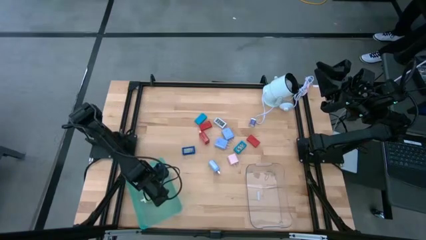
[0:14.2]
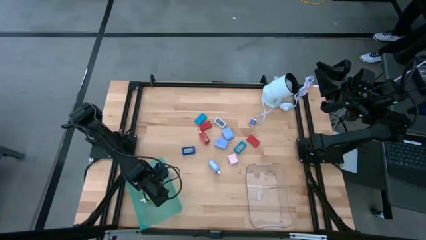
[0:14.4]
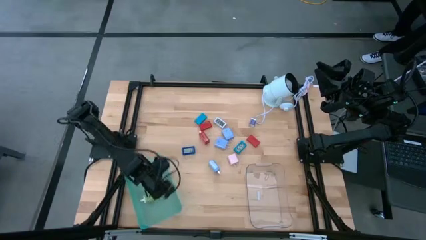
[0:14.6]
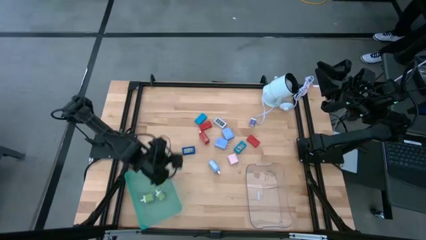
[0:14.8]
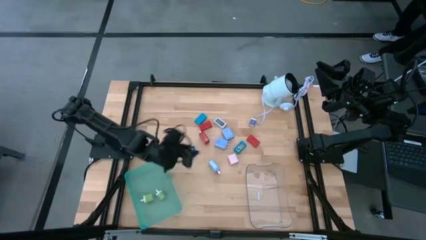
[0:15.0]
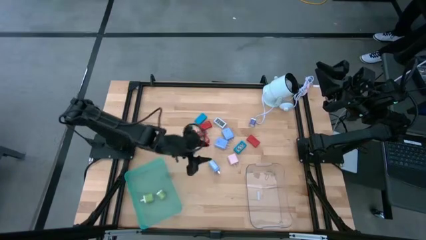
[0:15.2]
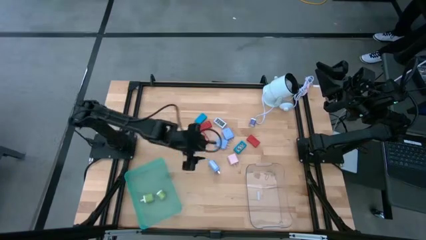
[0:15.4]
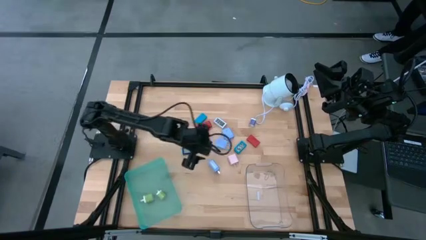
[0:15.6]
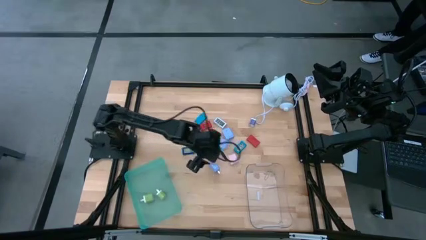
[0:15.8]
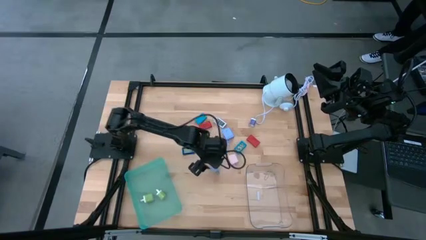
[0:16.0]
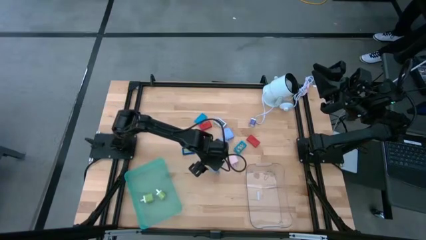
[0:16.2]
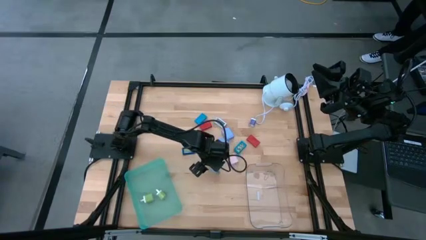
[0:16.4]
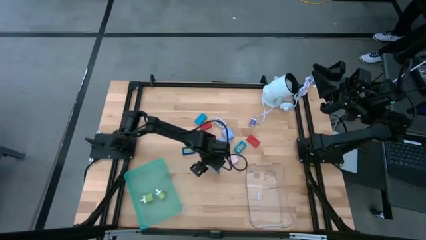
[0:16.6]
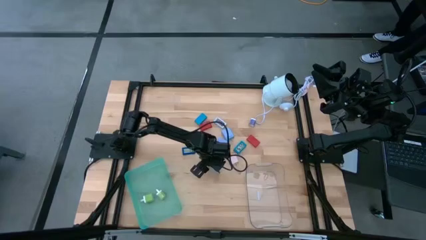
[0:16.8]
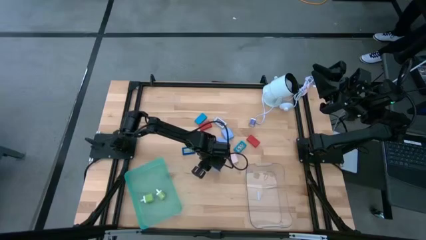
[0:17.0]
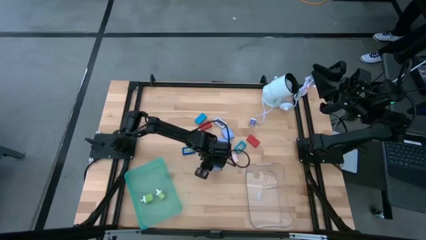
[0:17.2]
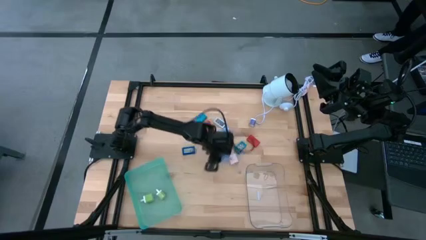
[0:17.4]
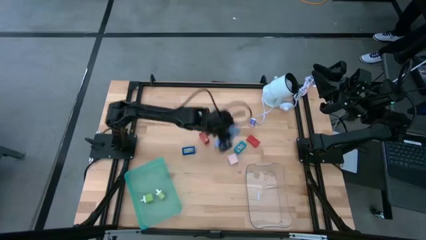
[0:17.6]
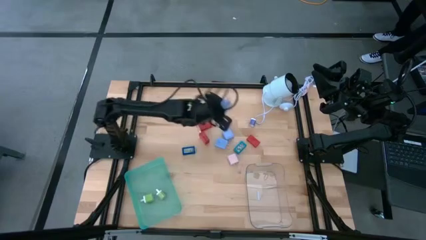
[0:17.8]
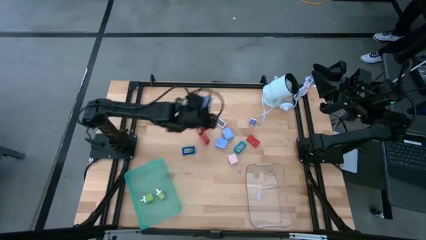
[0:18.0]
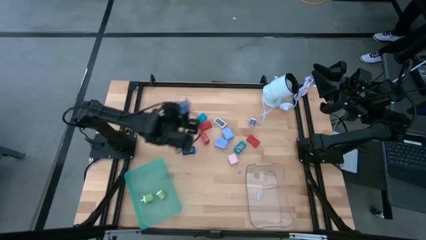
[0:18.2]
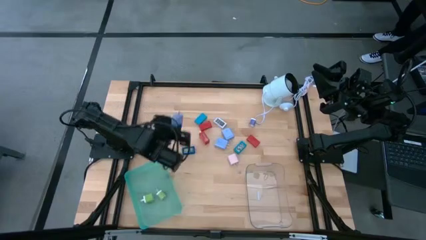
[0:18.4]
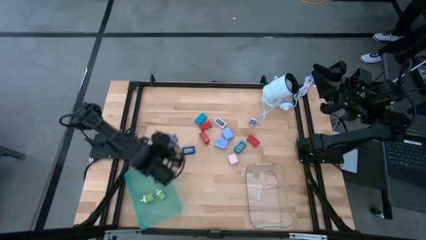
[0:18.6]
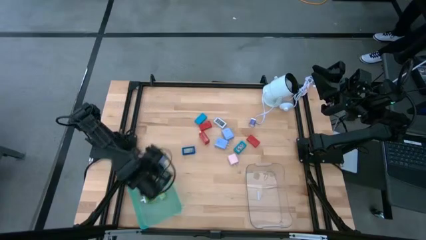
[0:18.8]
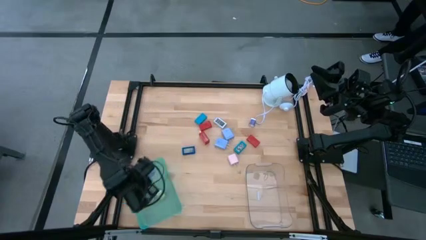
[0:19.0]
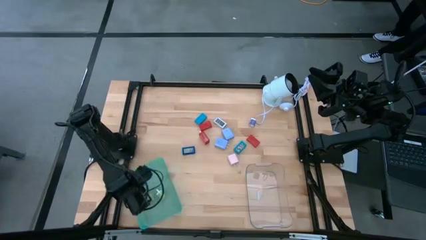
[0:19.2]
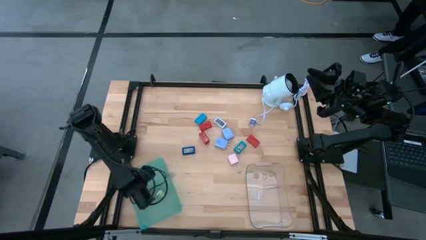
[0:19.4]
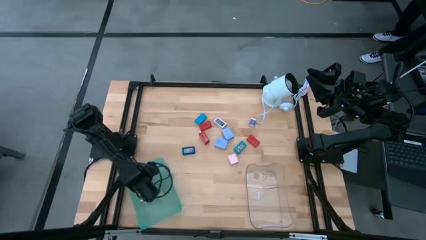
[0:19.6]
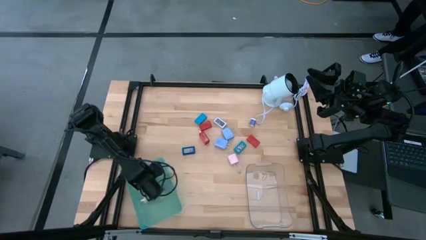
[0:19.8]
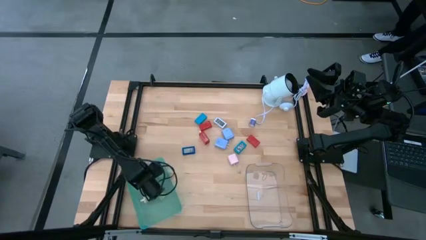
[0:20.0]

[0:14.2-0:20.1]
Task: Pick & Place Office items
Put the bottom blue charger adapter into the blue bin

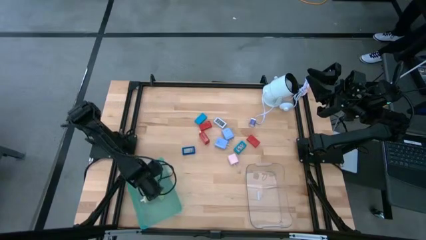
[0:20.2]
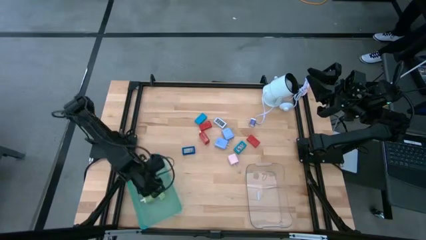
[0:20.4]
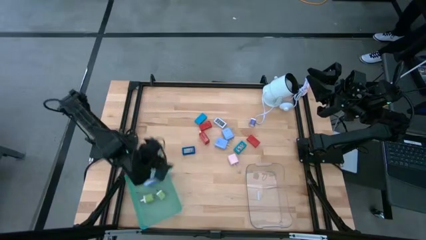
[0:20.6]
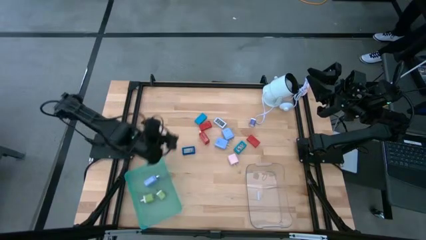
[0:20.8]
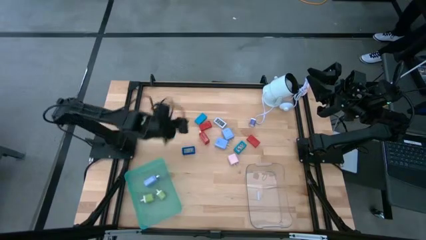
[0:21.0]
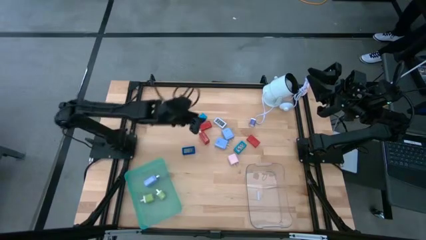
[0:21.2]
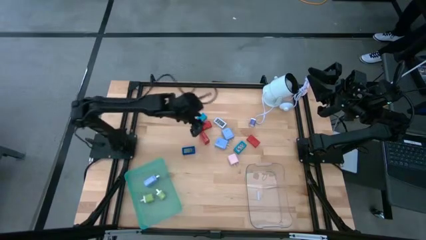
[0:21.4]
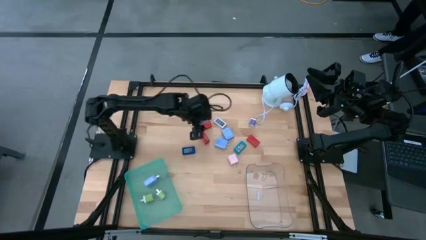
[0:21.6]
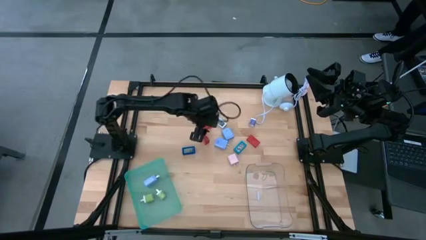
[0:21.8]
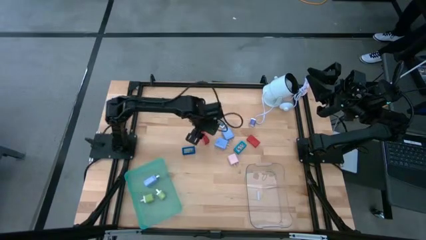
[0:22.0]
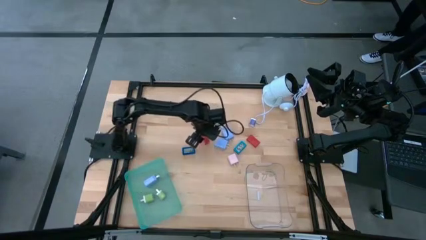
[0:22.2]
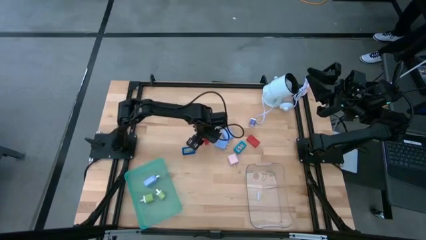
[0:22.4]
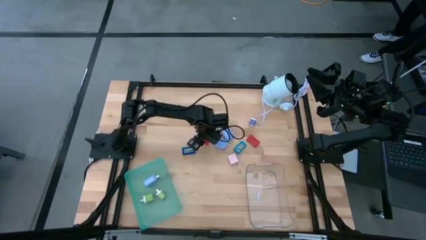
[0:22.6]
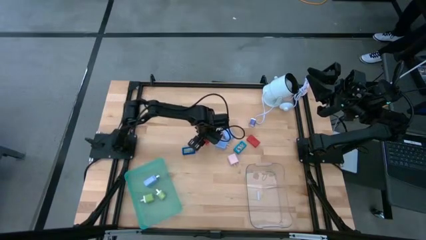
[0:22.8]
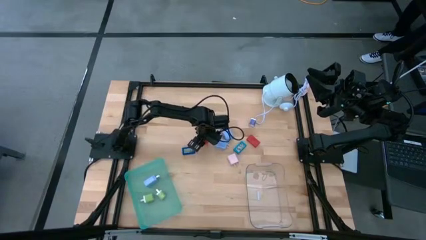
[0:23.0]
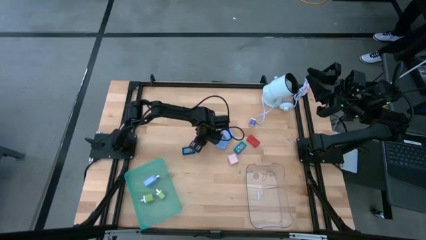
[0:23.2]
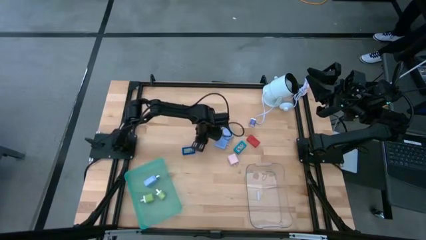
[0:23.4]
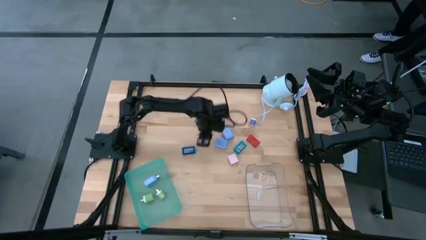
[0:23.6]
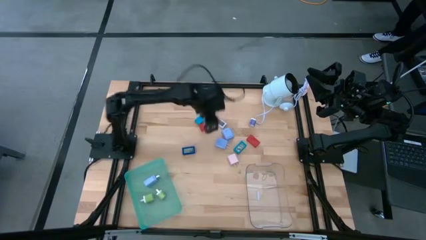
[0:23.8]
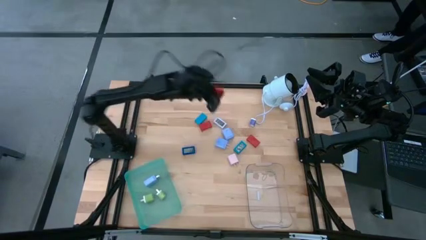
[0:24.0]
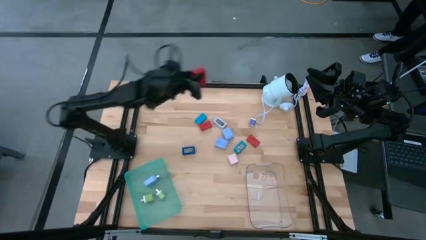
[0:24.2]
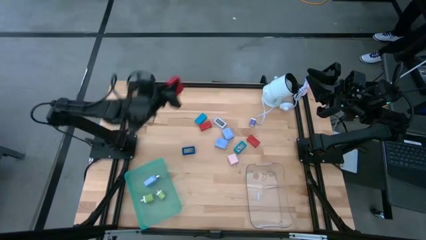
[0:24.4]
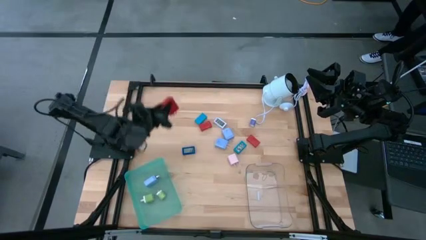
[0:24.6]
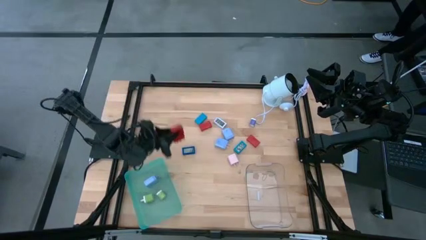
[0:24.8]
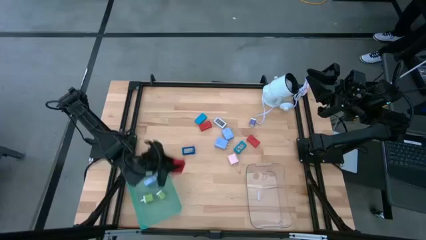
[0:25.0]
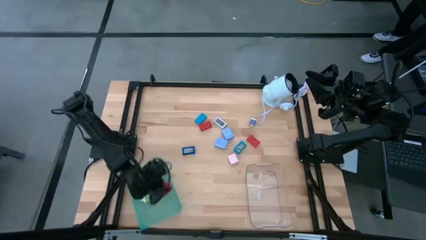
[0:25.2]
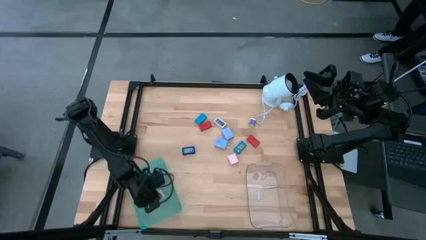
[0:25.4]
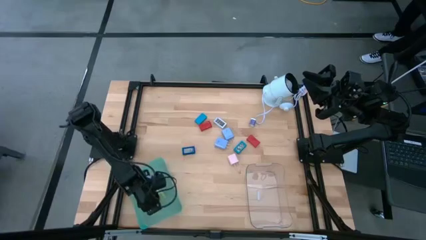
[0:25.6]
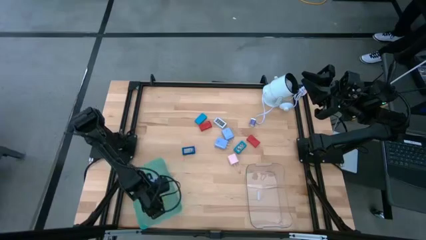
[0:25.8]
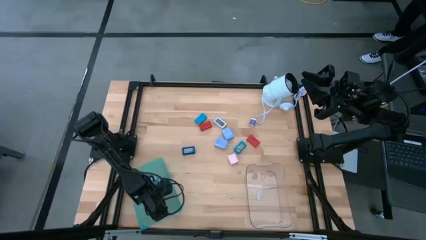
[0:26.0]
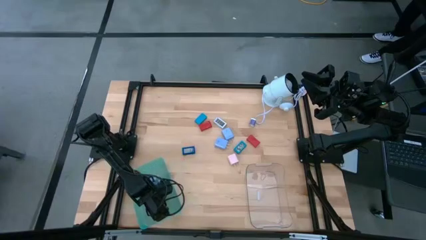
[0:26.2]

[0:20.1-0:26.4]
Put the bottom red charger adapter into the blue bin

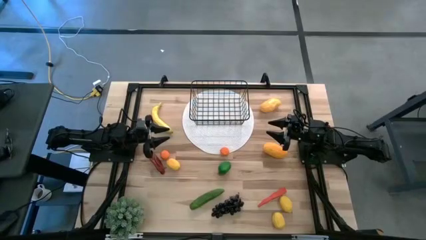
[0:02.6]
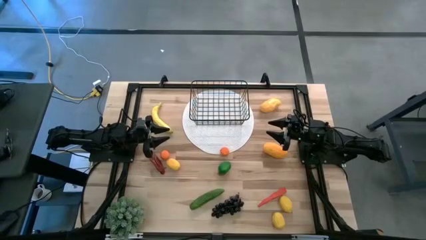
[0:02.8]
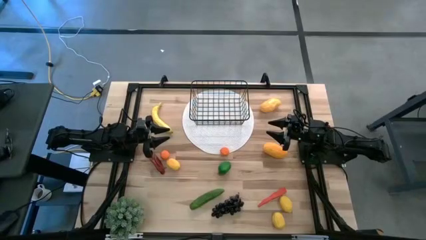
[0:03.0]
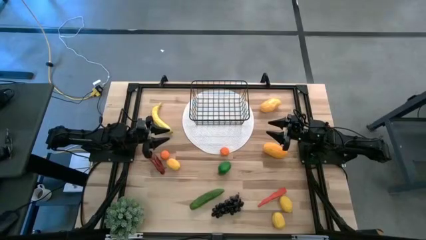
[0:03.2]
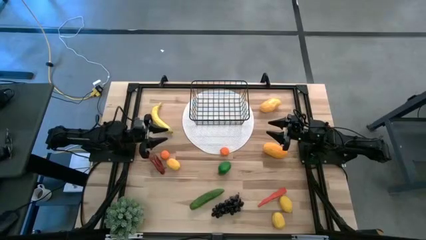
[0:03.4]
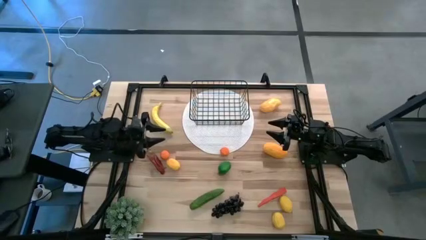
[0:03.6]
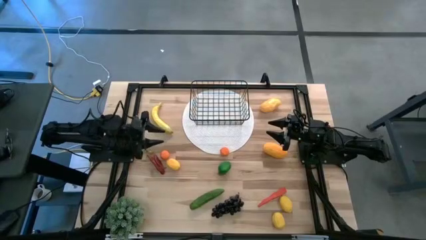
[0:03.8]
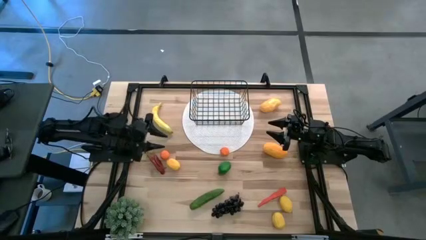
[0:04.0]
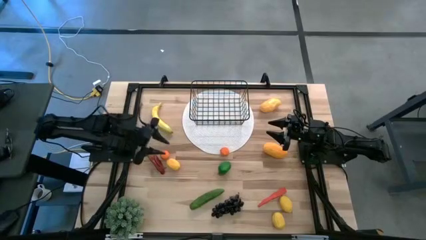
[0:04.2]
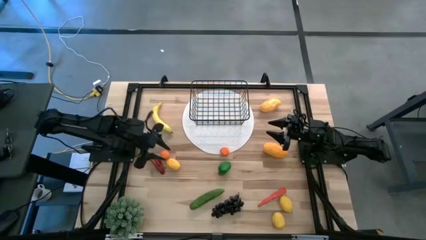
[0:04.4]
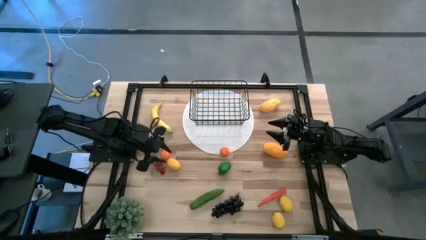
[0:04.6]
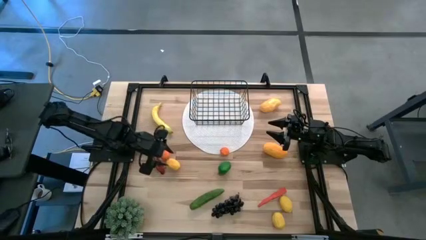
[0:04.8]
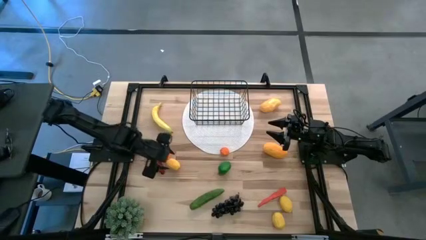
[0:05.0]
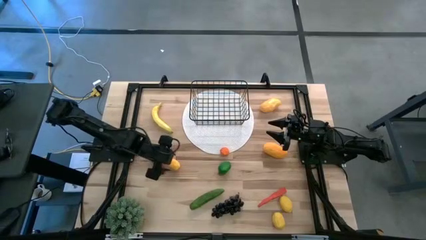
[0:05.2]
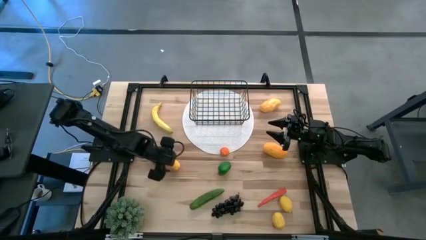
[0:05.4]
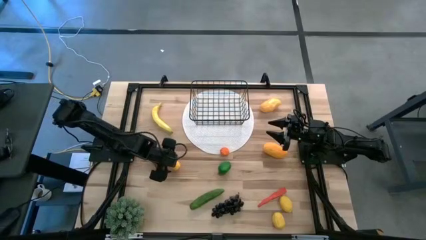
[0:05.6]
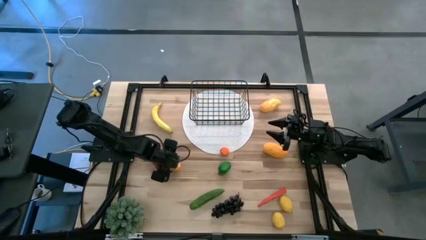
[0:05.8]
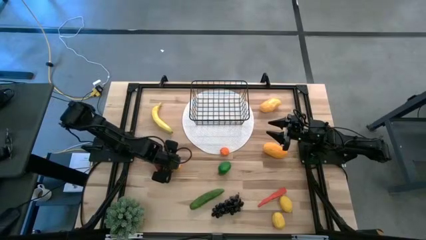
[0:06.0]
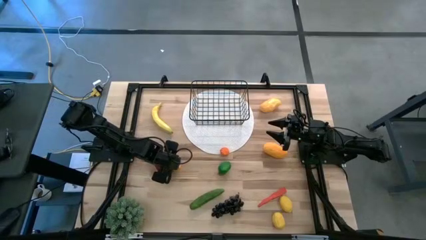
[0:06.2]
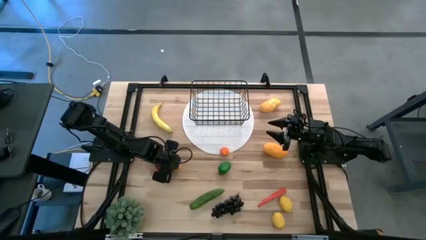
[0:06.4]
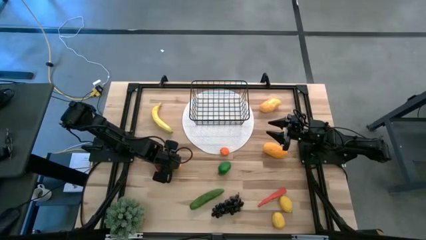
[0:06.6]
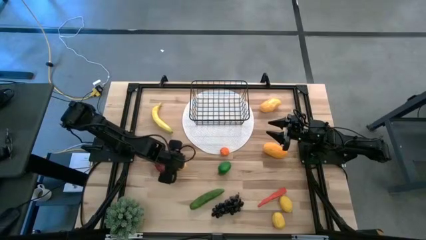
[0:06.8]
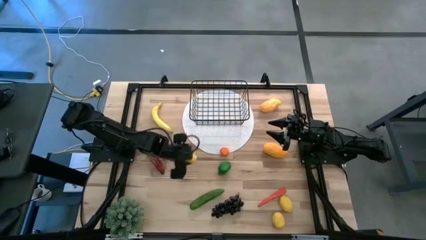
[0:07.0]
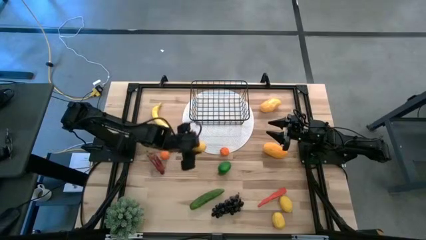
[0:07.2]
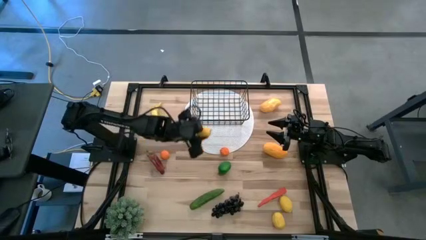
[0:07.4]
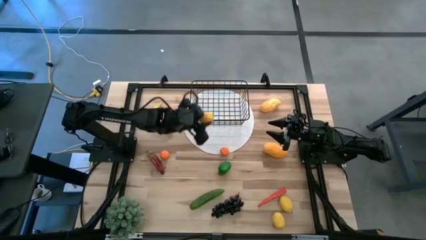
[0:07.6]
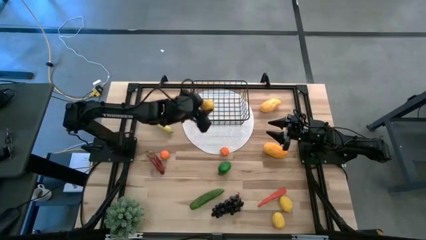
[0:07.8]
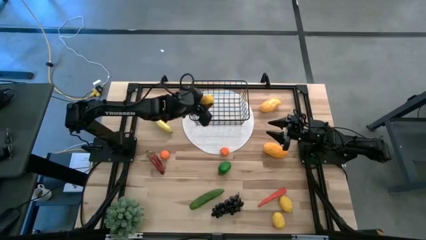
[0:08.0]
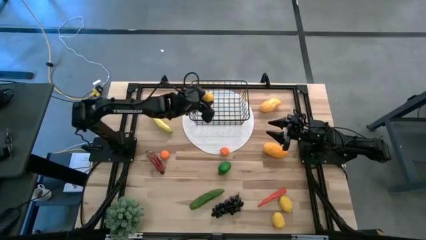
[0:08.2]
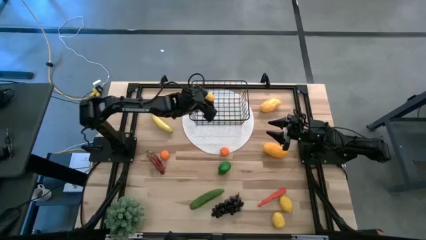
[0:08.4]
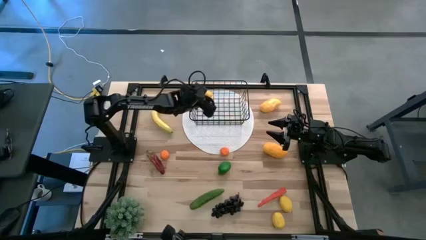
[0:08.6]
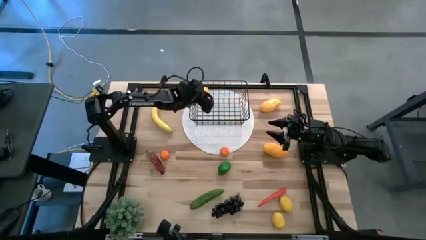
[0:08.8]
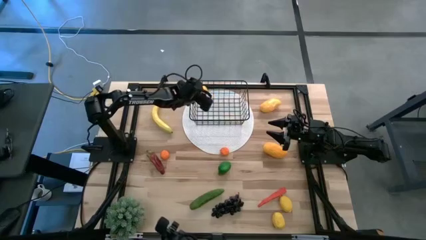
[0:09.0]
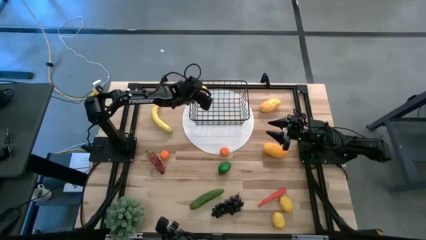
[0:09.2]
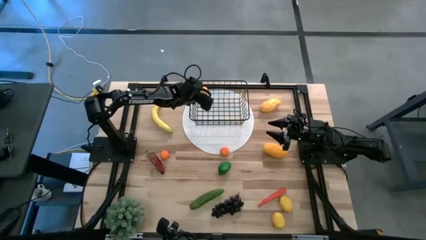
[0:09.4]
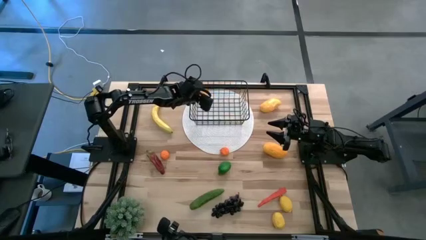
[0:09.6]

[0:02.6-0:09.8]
Task: Build produce basket
Put the left lemon into the wire basket
